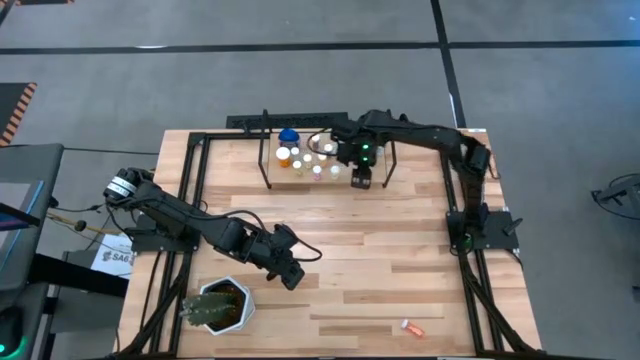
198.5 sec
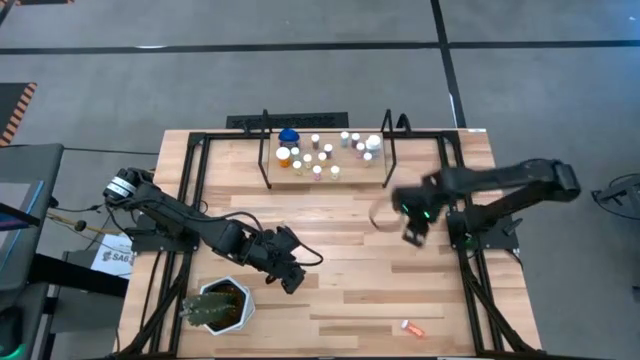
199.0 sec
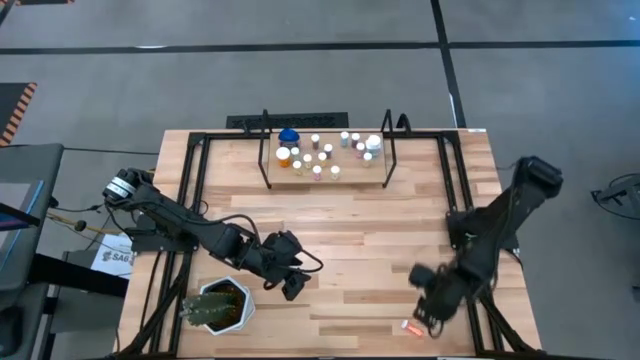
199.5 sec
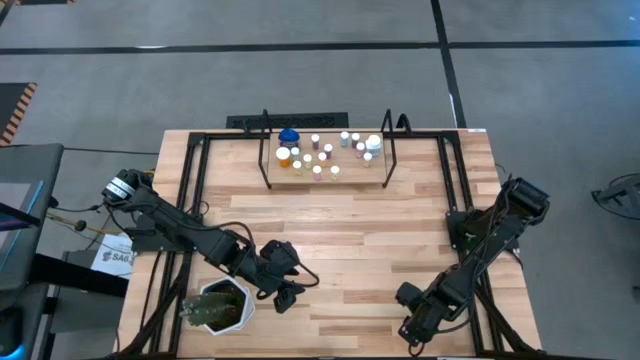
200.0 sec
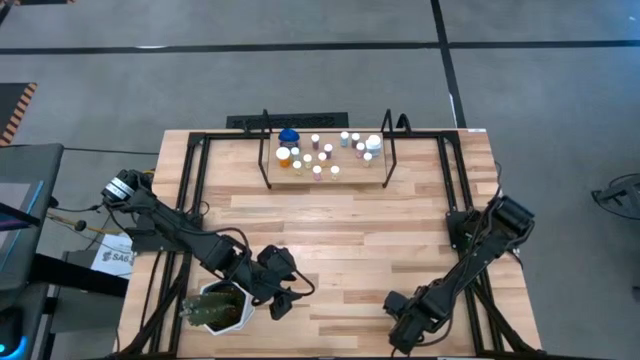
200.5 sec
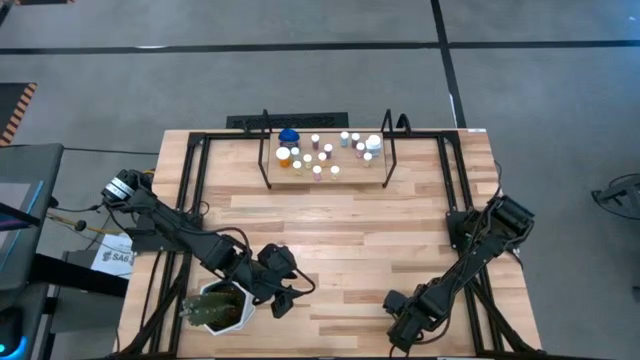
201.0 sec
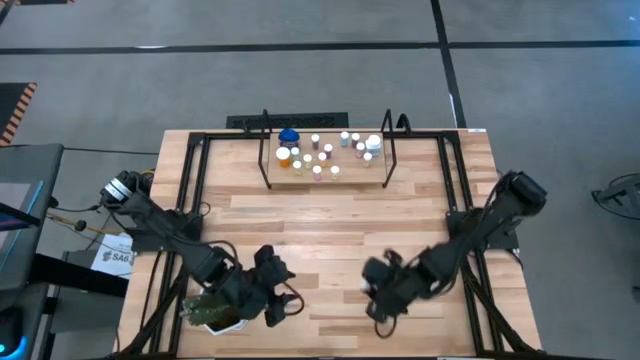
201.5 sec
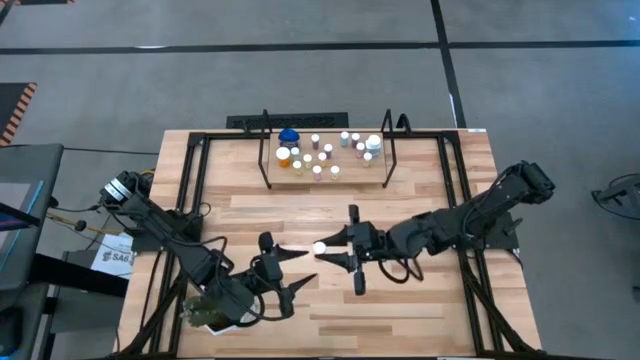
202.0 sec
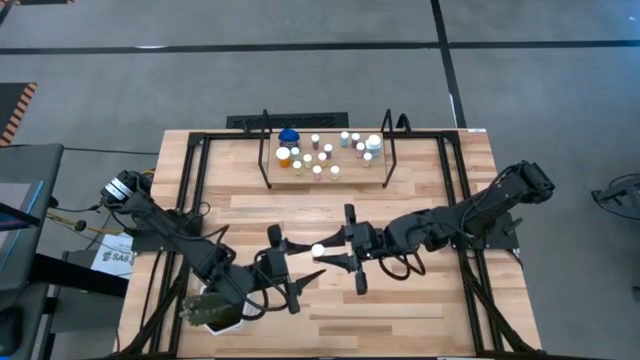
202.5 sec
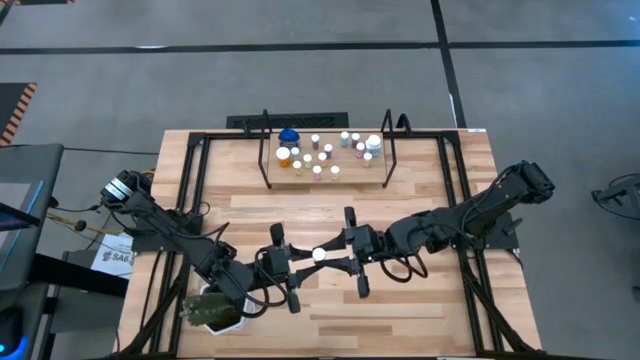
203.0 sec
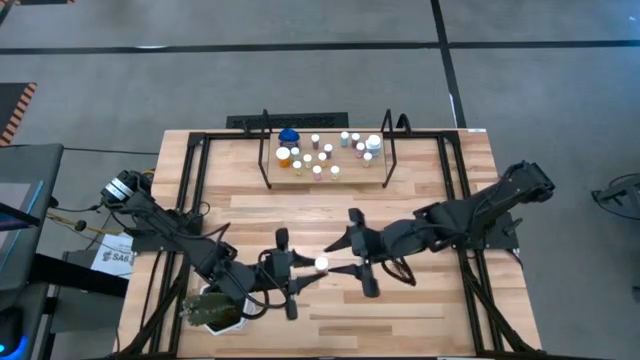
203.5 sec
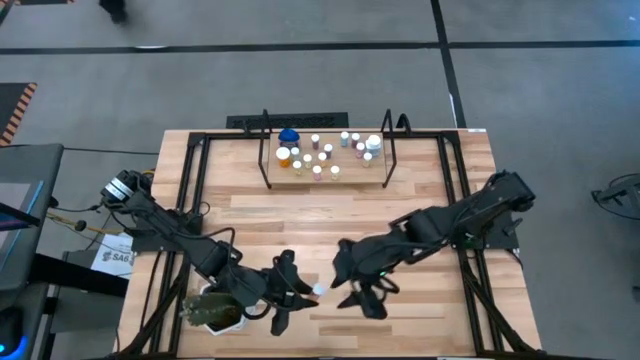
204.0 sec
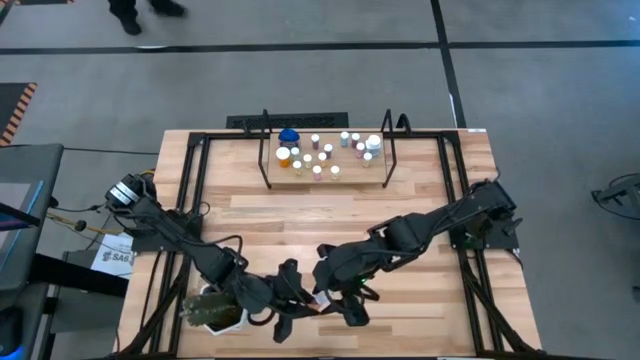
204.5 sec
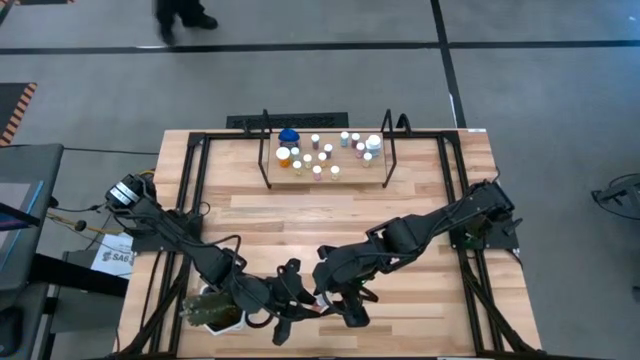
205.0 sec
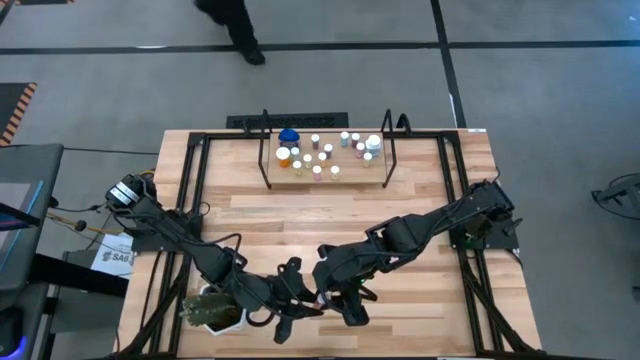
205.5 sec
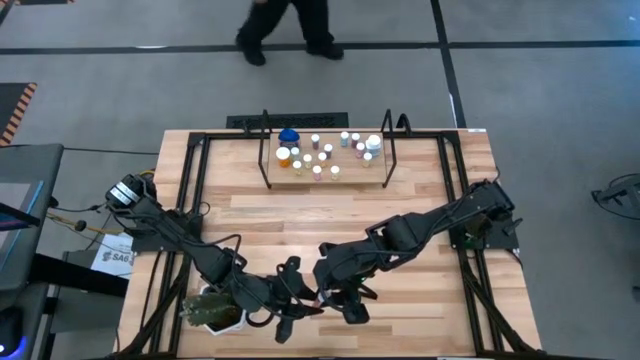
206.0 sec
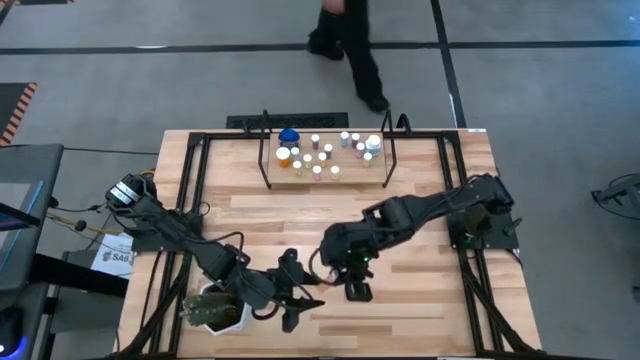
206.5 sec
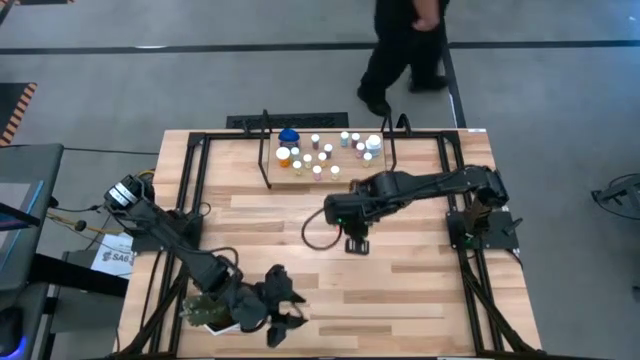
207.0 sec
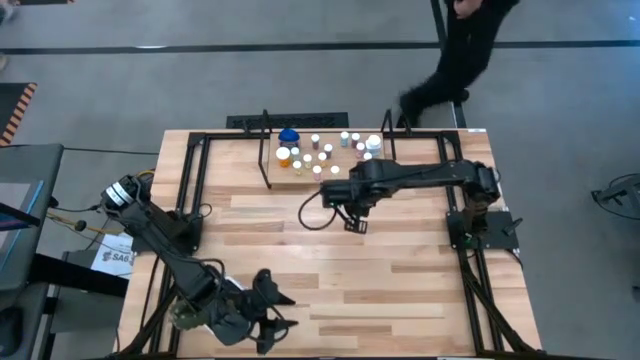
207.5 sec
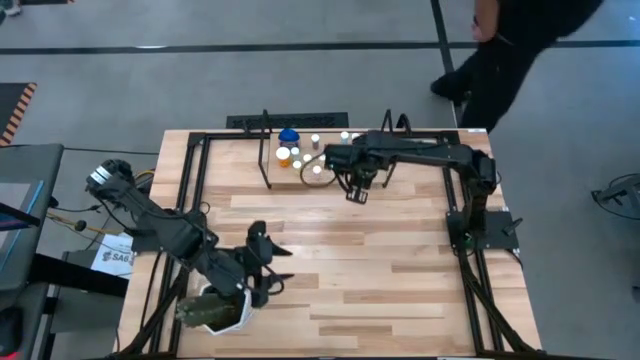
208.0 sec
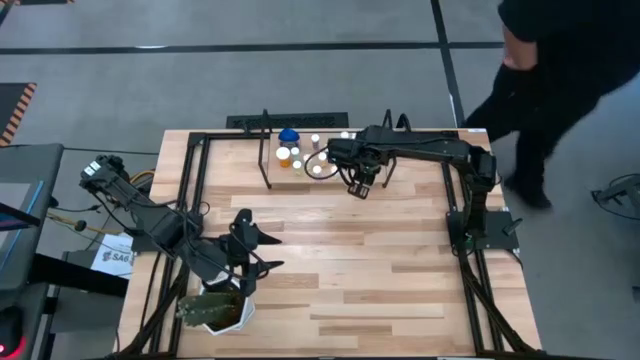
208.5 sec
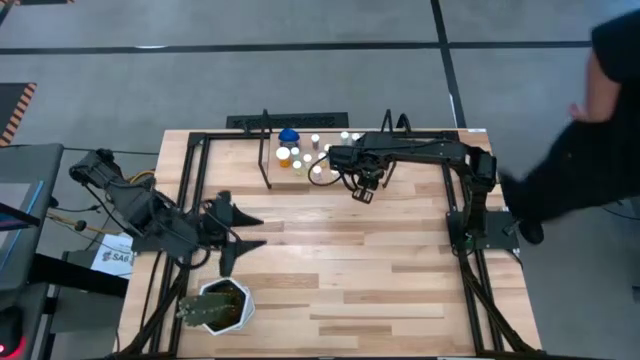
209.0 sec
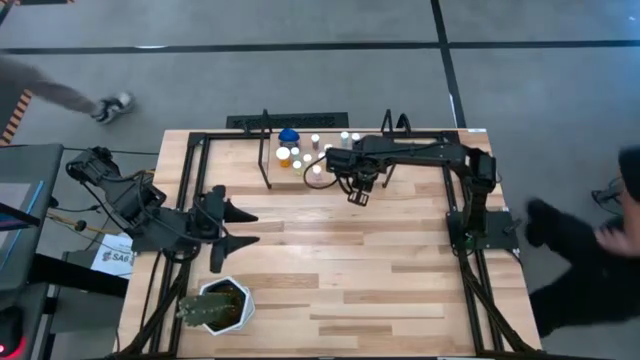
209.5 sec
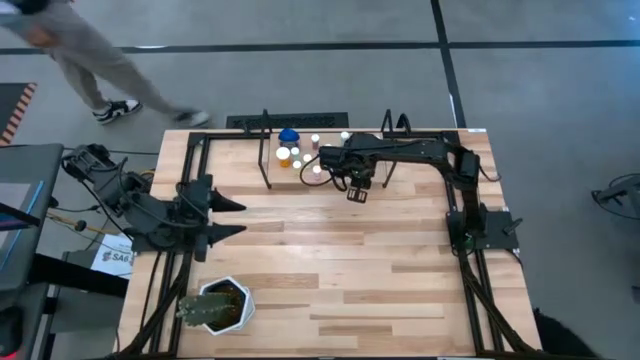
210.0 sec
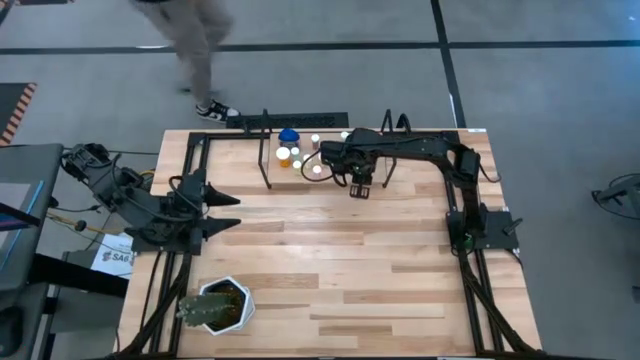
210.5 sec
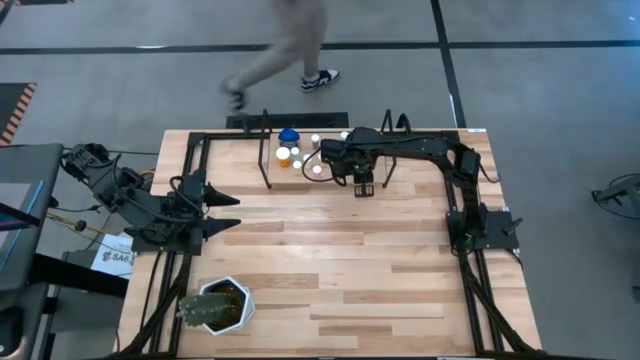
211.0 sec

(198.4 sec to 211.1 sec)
Task: Pick and place medicine bottles onto shelf by color
Put the orange pill bottle on the shelf

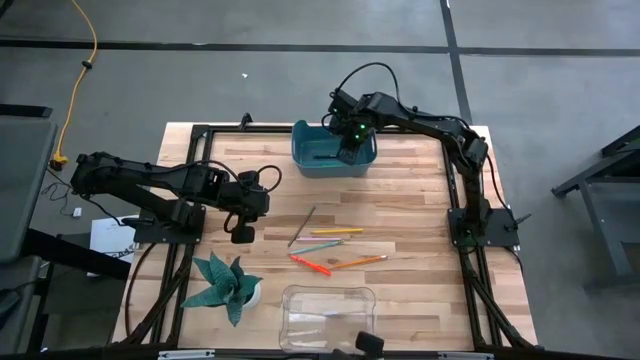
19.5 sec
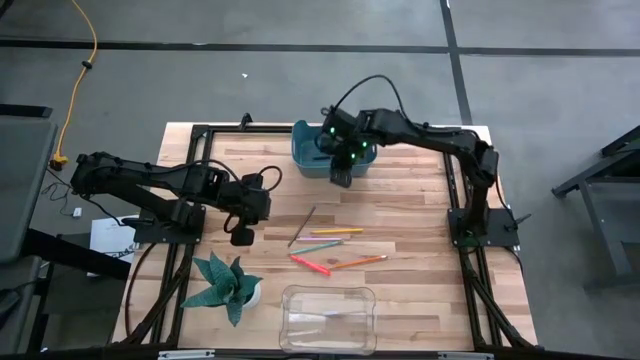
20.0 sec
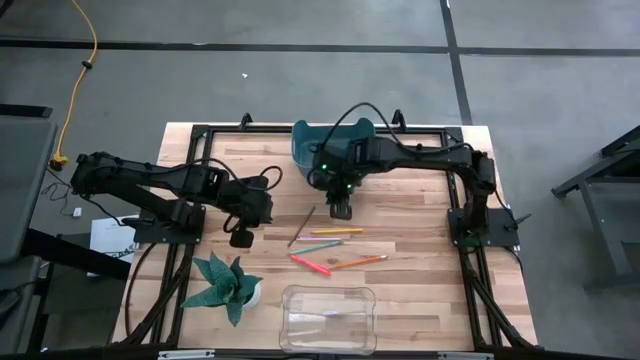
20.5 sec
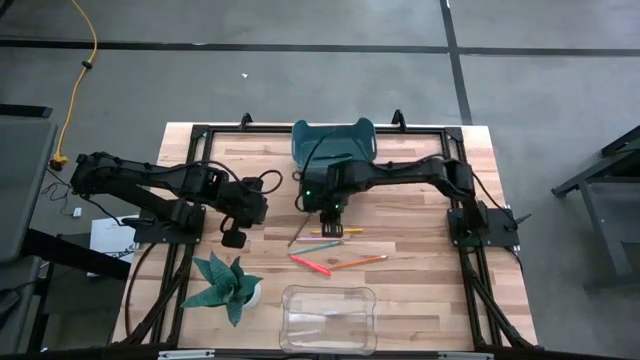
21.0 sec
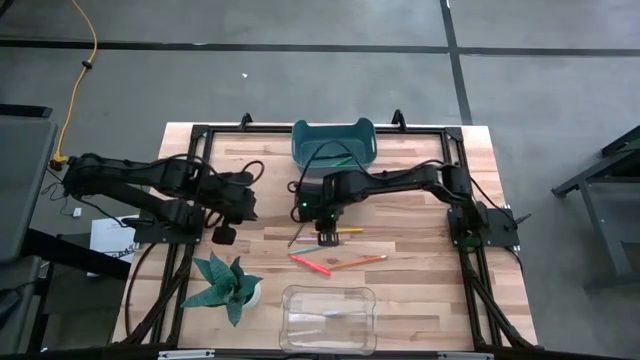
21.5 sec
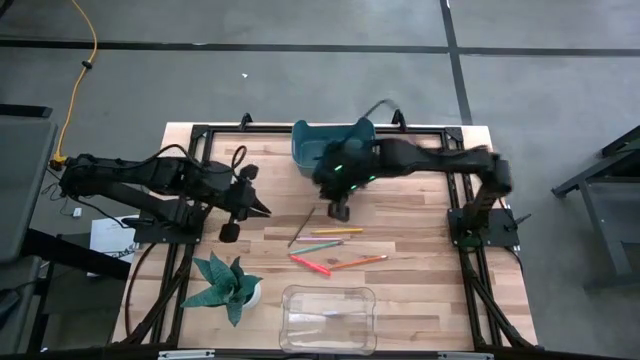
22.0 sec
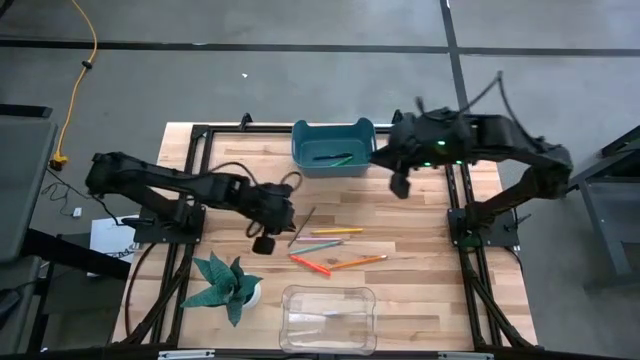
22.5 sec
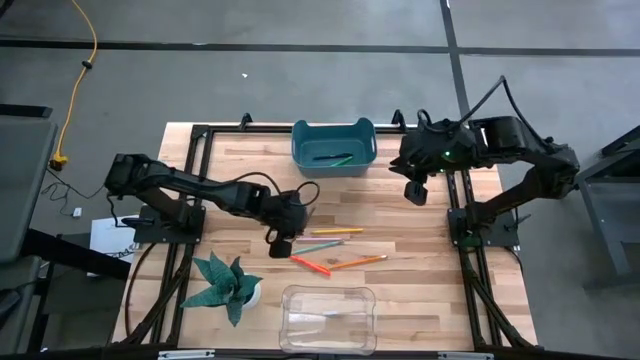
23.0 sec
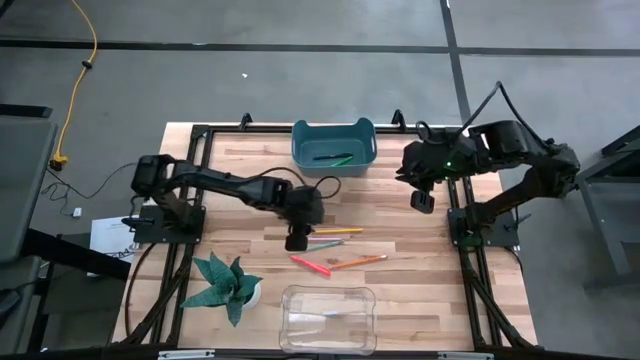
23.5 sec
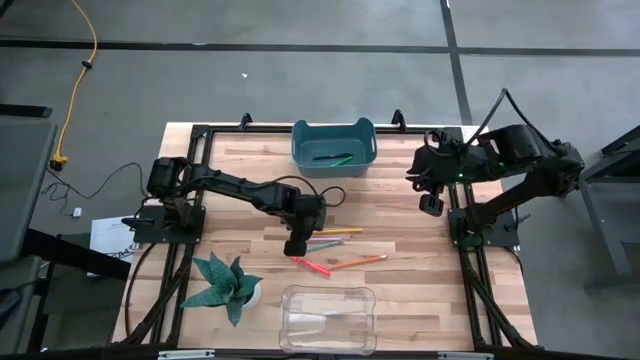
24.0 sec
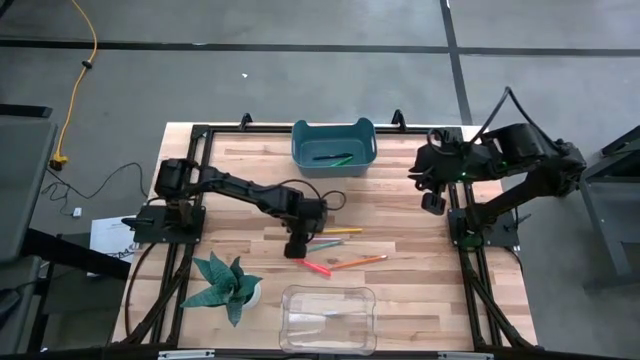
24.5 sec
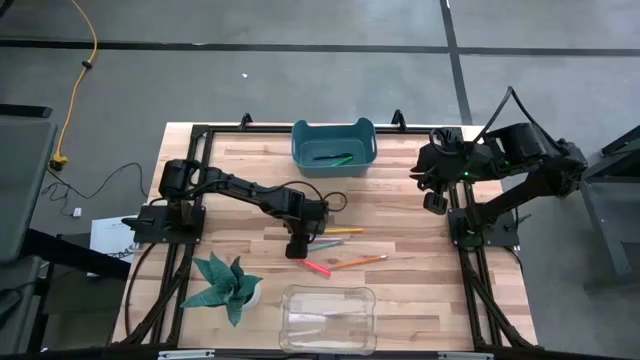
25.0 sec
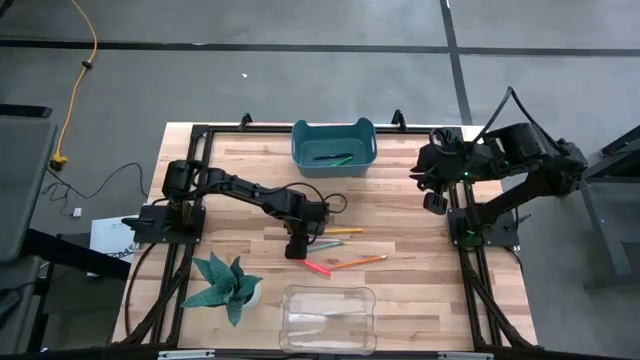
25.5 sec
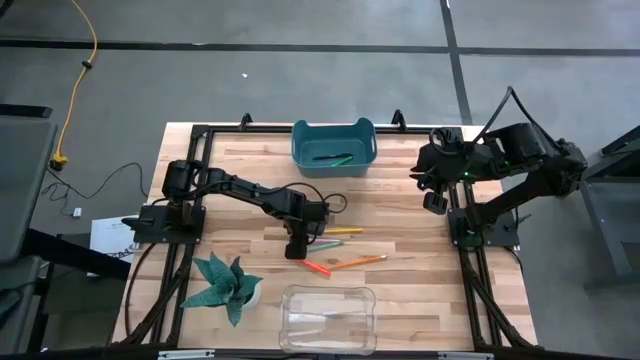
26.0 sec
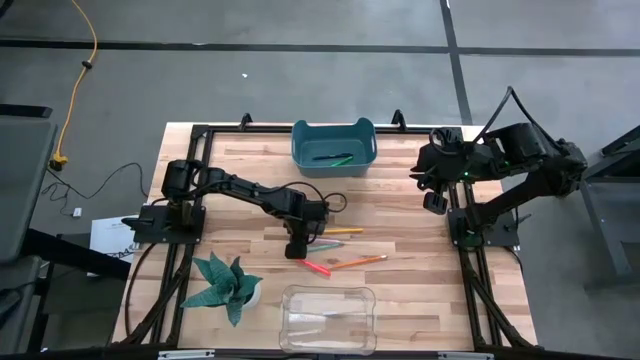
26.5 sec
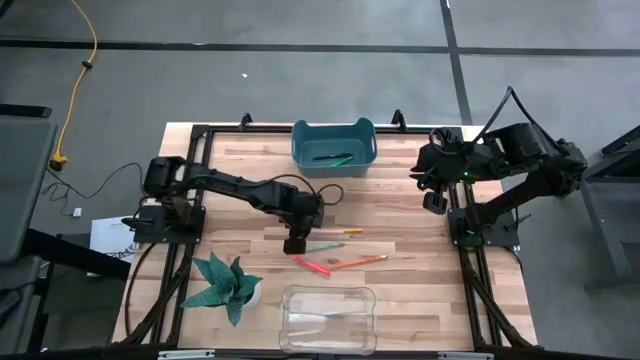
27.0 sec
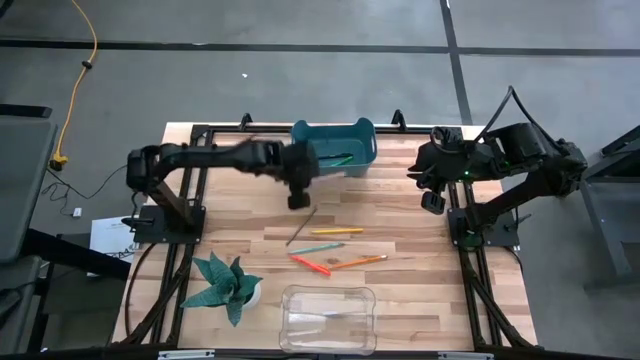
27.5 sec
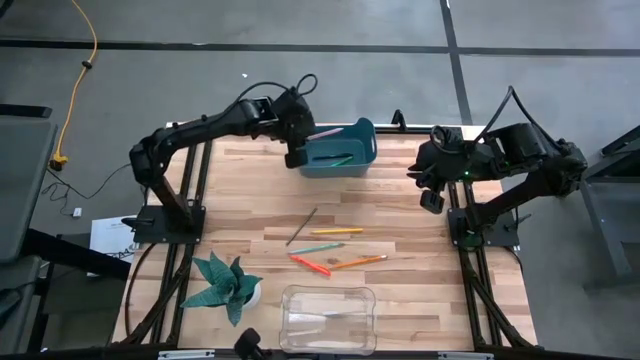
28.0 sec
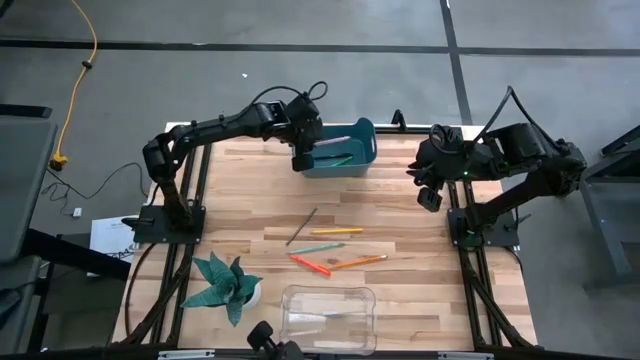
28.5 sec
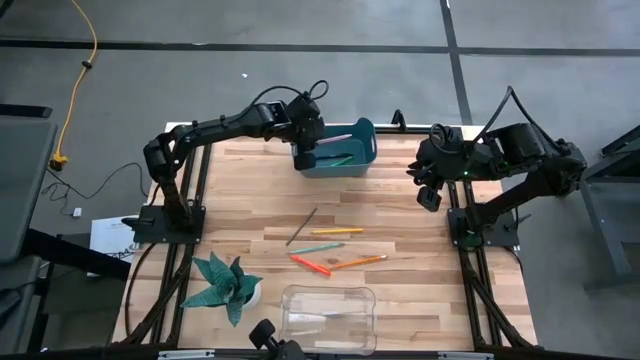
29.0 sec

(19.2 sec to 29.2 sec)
Task: Sort pens & pencils
Put the purple pen into the dark blue bin
